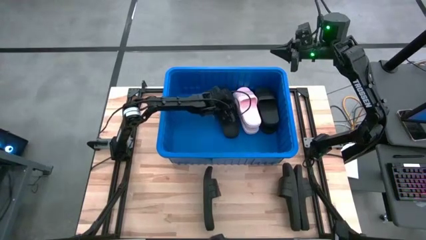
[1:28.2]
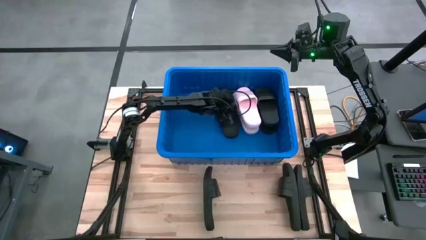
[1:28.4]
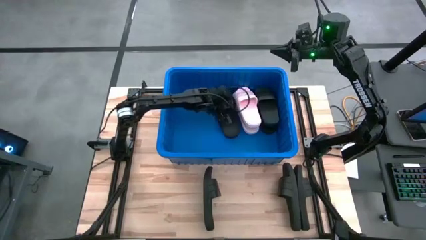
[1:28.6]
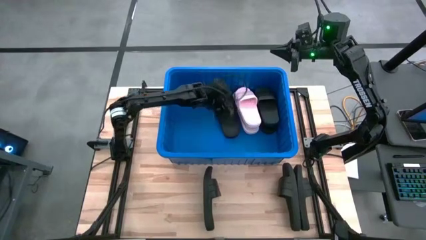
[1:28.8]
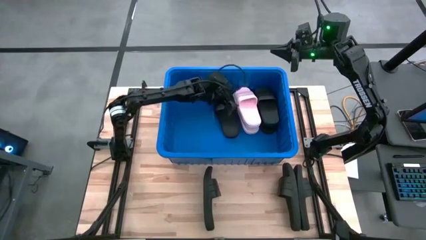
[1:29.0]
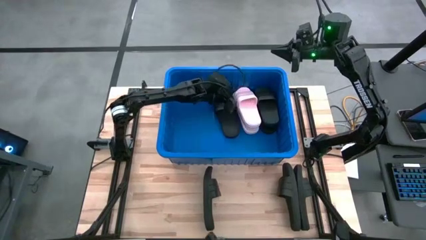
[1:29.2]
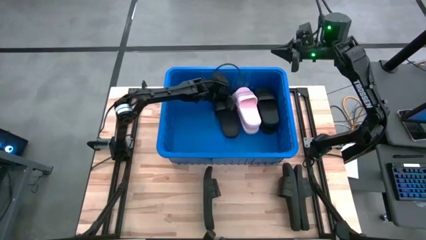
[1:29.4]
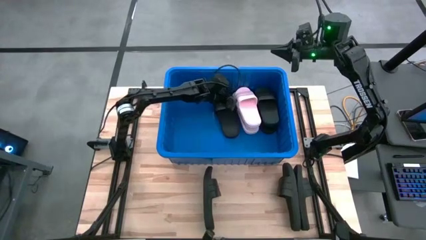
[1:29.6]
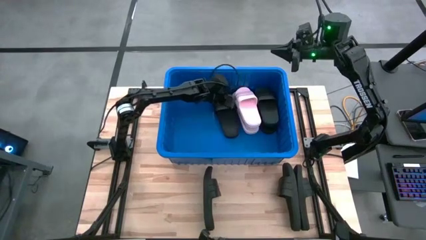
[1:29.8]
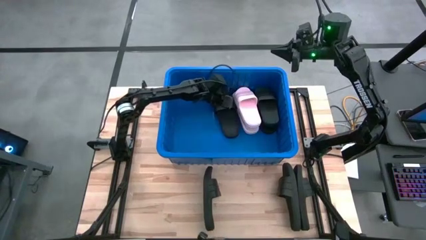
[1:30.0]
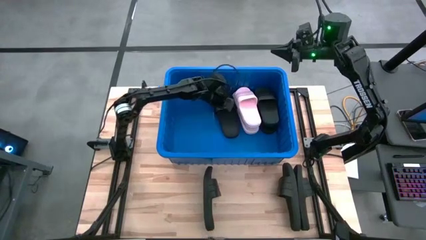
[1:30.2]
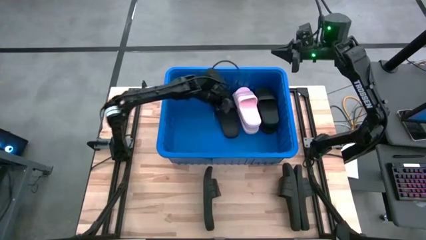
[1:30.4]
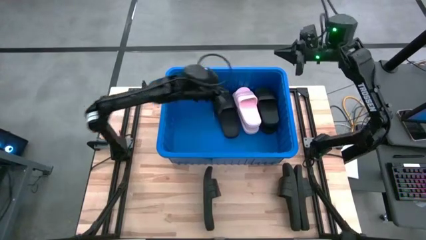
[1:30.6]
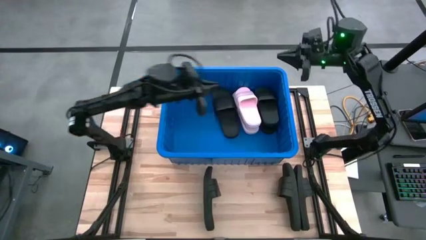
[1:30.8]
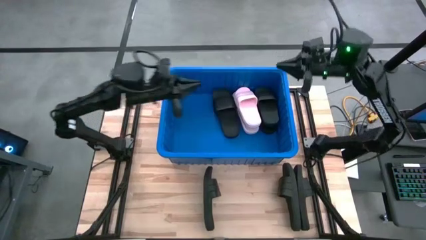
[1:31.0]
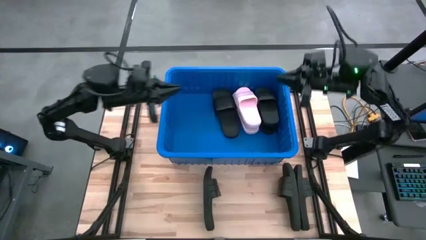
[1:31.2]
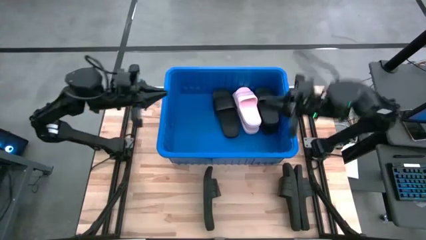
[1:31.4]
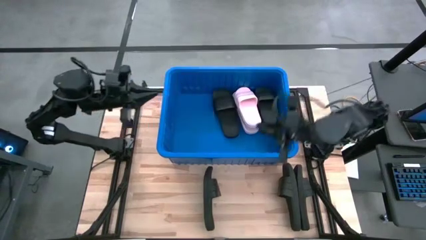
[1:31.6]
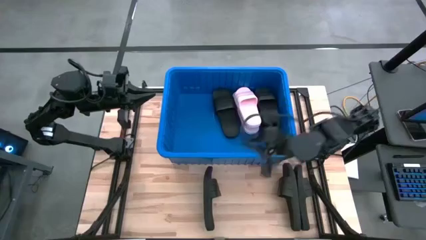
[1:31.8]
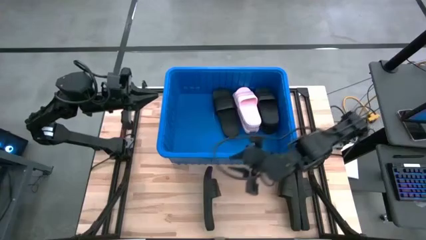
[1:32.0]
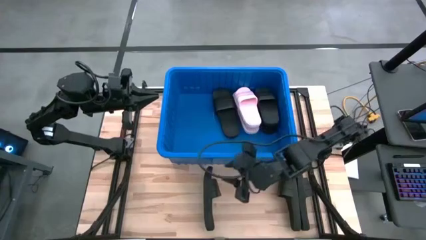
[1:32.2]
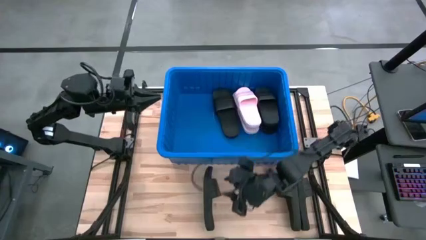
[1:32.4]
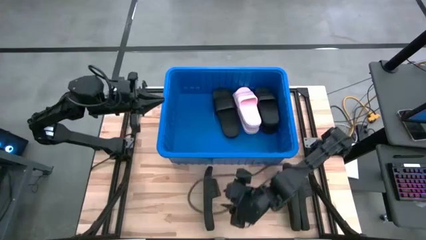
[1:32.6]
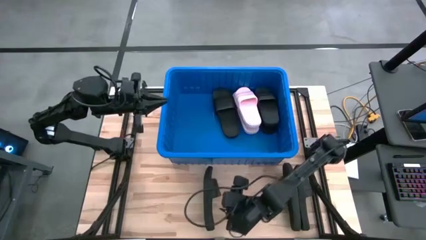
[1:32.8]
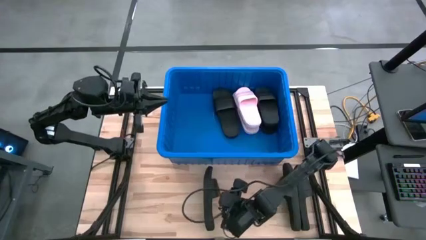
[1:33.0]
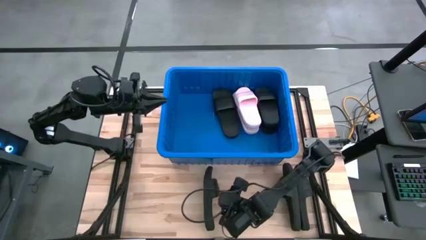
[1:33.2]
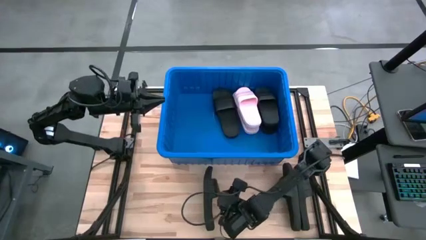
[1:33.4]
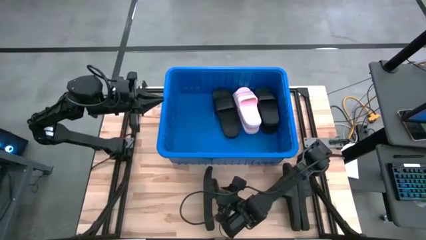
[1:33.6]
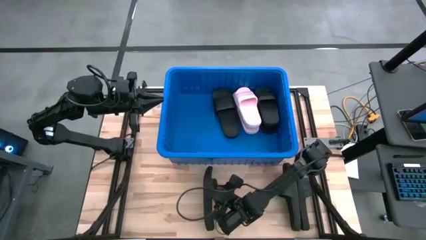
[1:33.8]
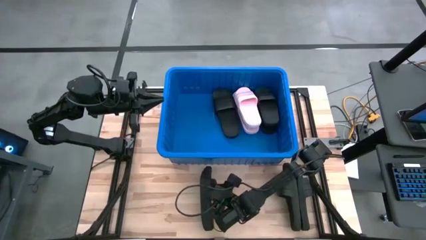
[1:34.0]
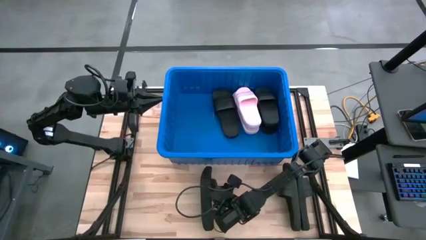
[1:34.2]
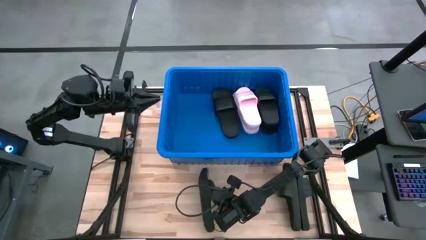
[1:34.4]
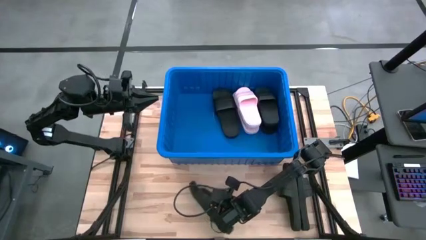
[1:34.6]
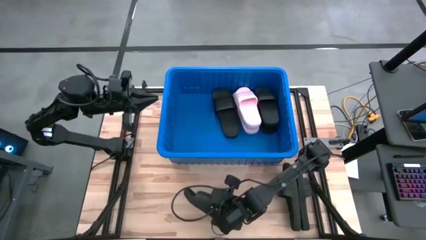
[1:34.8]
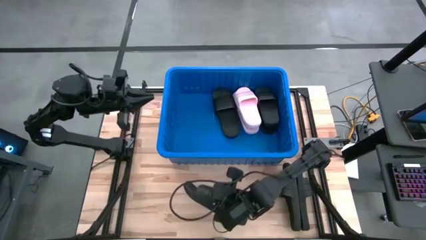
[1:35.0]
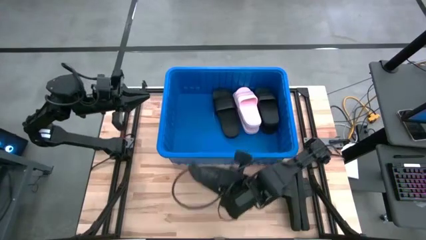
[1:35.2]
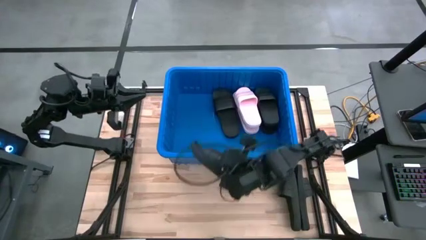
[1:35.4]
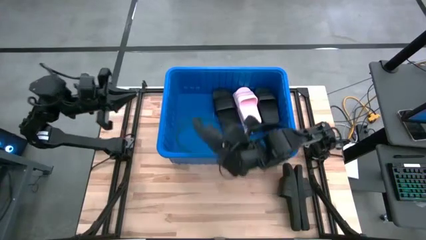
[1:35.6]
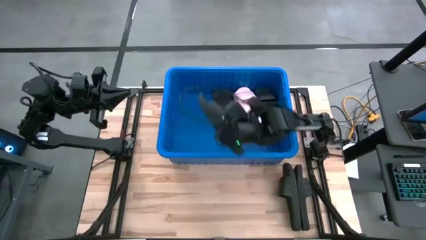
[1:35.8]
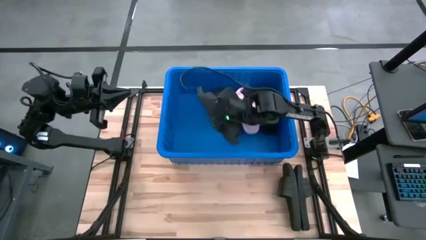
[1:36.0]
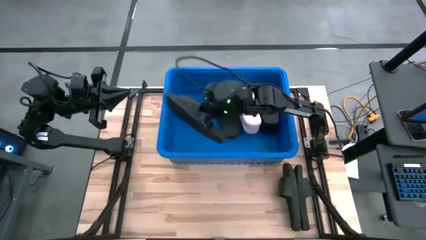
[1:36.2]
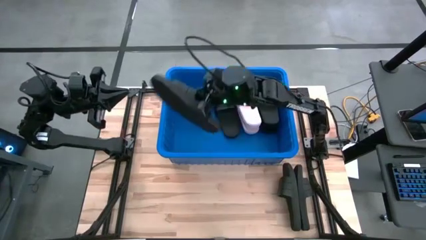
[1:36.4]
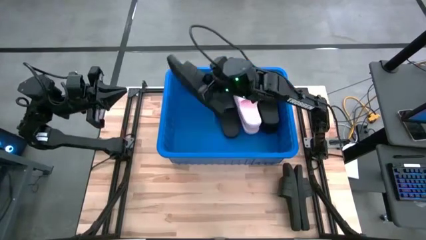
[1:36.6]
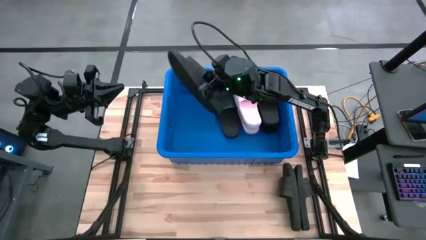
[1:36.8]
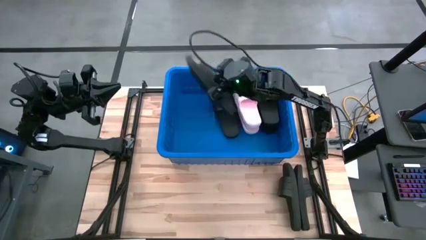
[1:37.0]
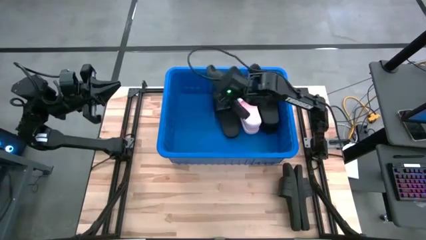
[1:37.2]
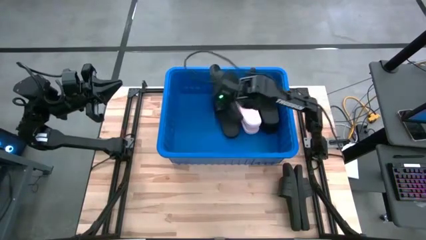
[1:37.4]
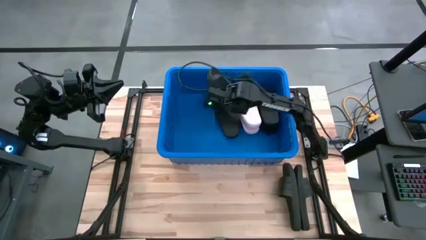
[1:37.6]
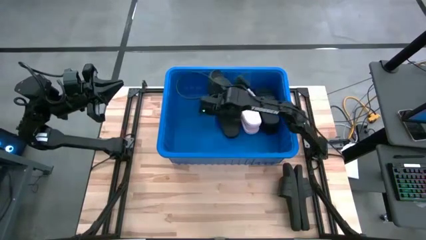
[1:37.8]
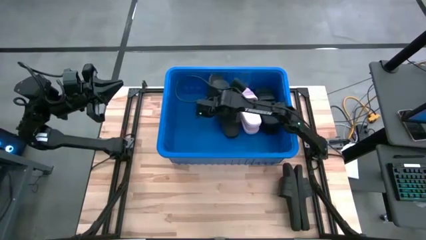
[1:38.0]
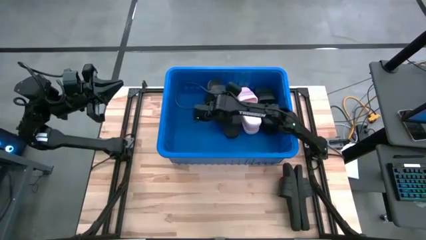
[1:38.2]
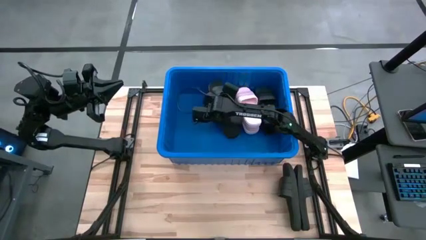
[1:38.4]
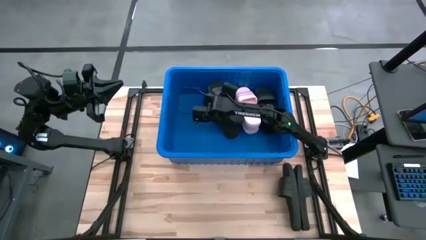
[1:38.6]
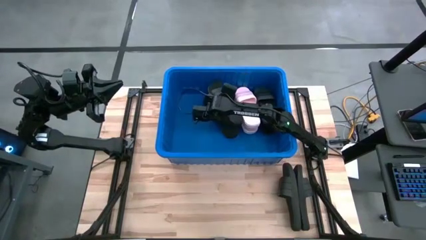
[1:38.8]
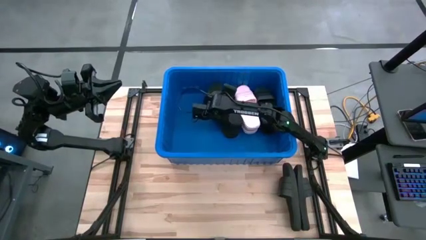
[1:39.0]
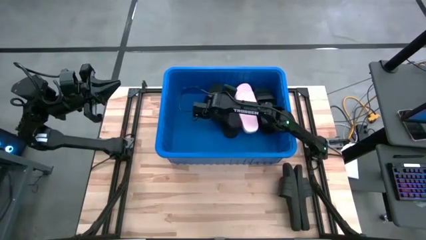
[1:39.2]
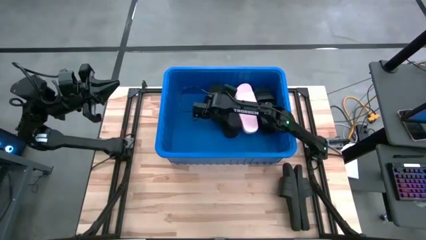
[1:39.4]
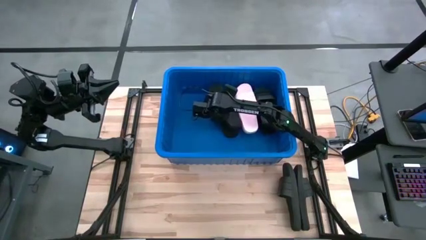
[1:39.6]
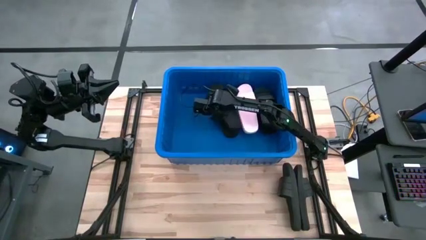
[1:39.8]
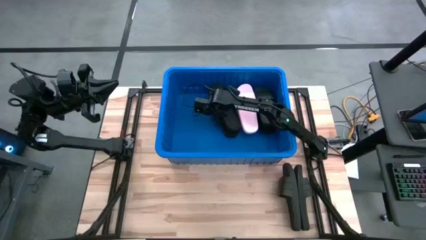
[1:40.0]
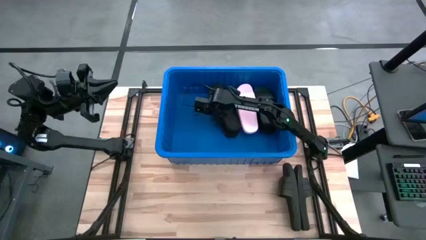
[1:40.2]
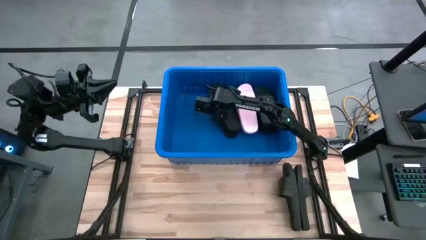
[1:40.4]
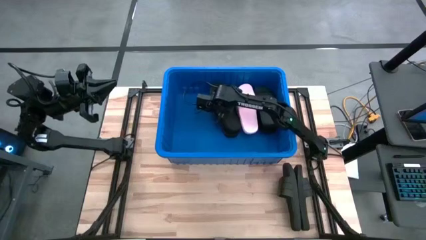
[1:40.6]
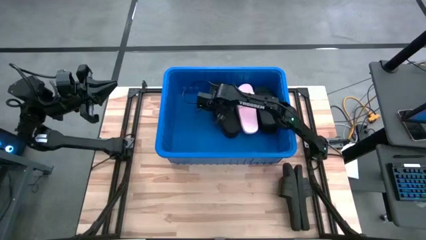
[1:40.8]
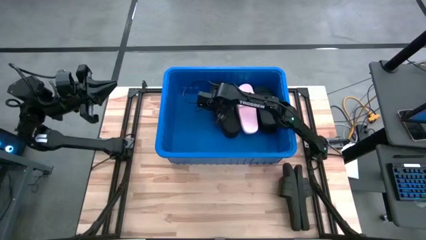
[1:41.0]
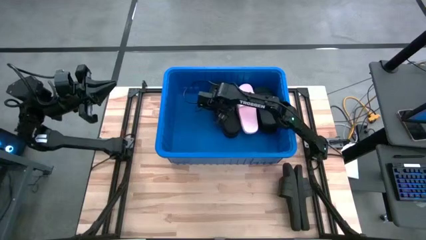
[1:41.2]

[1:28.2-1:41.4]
Task: Pick and place slides into bin
Put the black slide into the blue bin
